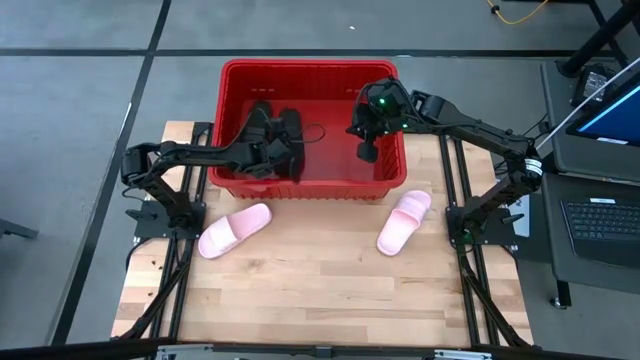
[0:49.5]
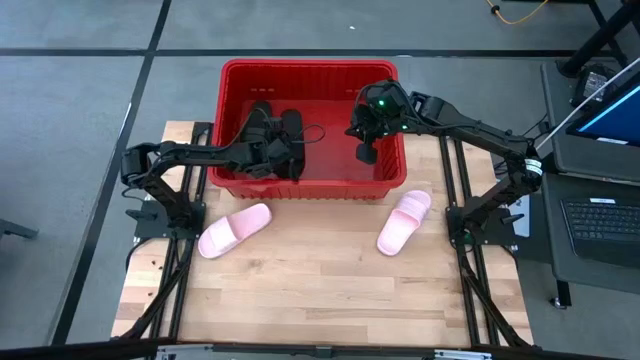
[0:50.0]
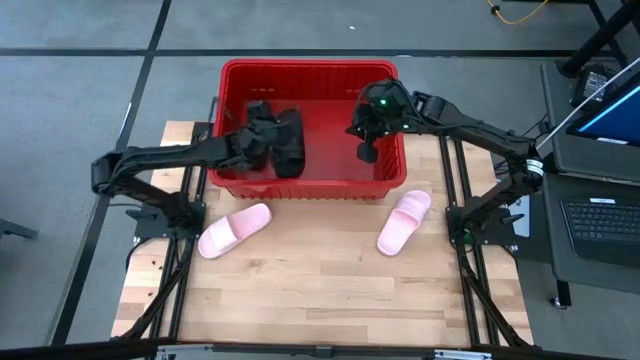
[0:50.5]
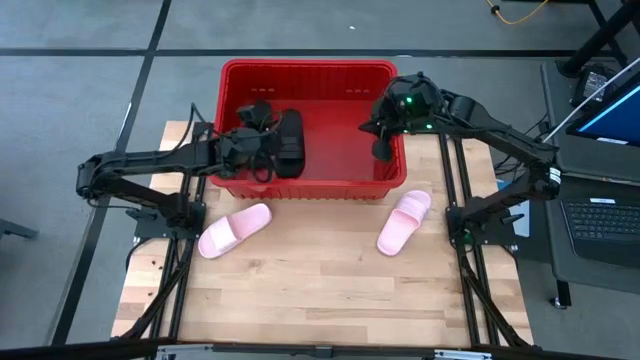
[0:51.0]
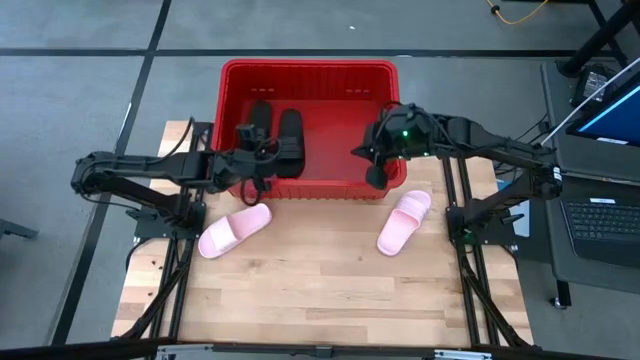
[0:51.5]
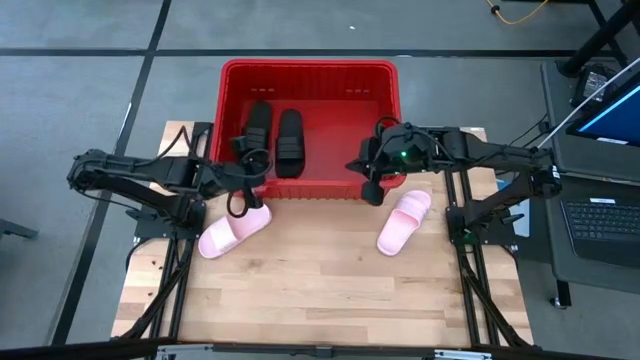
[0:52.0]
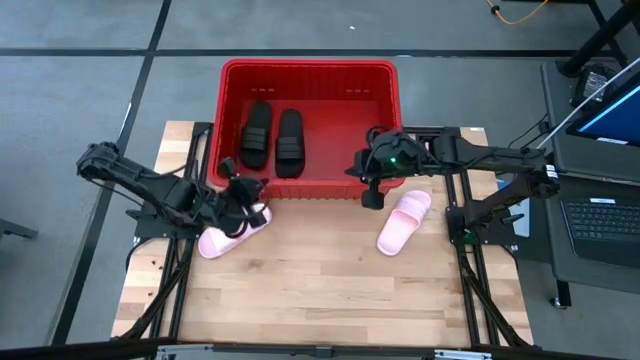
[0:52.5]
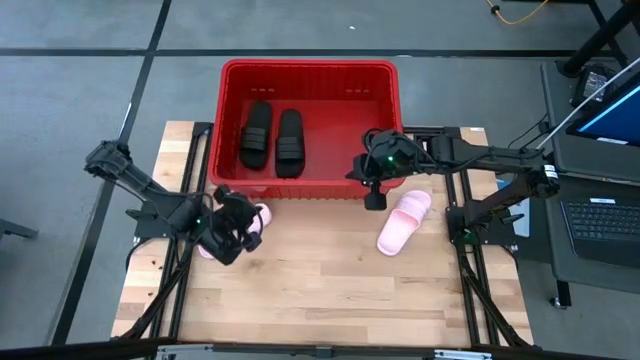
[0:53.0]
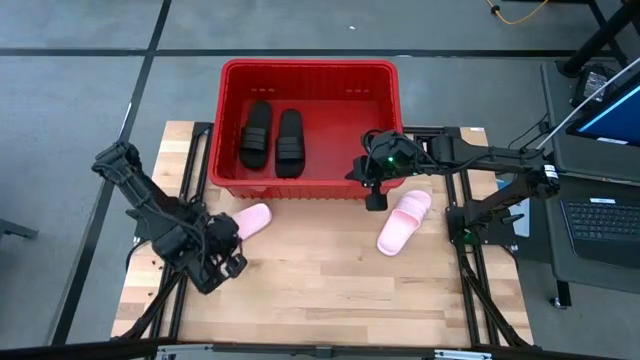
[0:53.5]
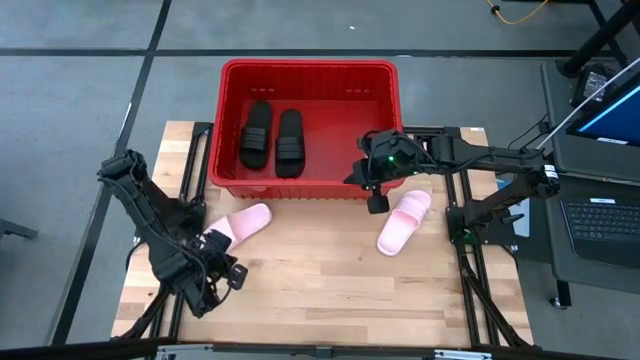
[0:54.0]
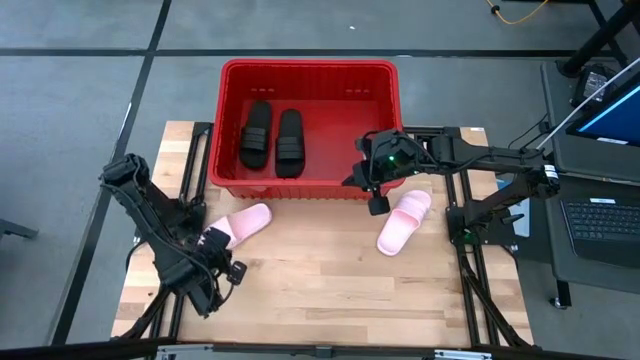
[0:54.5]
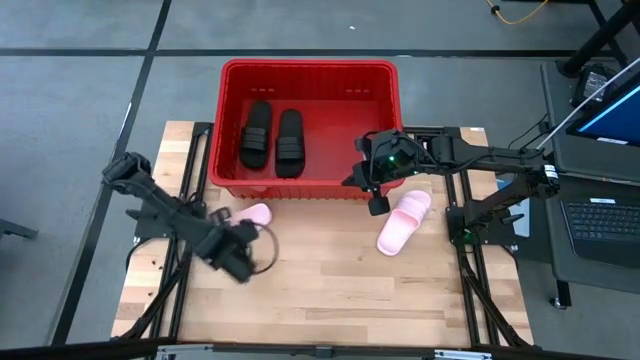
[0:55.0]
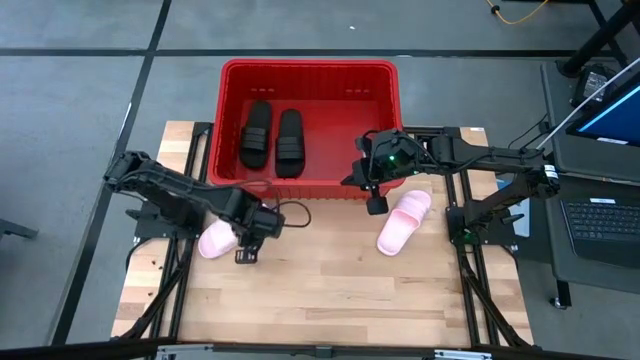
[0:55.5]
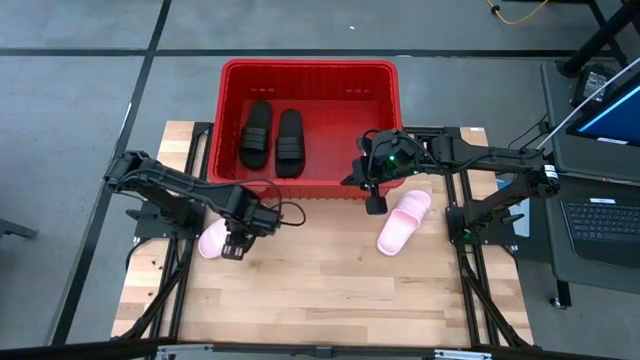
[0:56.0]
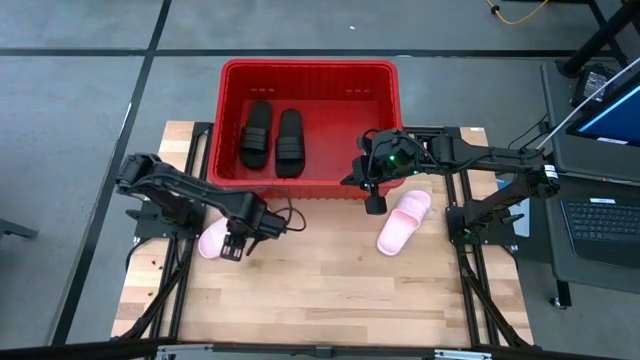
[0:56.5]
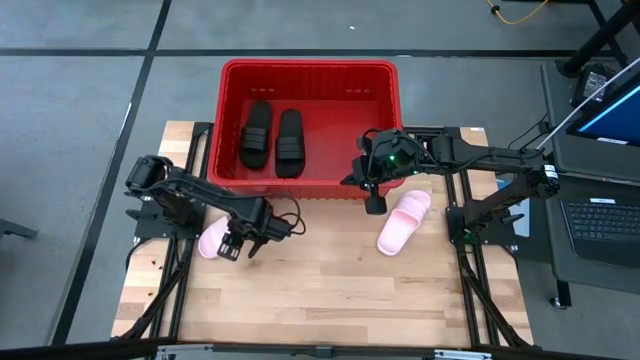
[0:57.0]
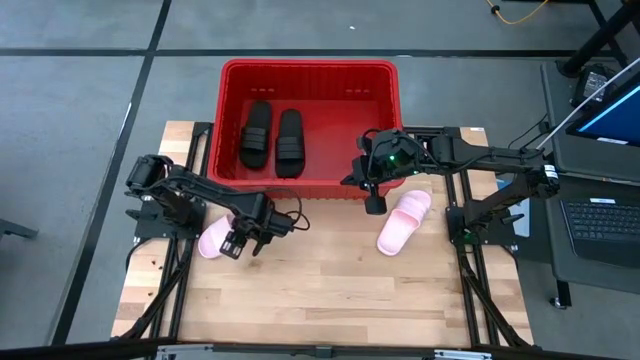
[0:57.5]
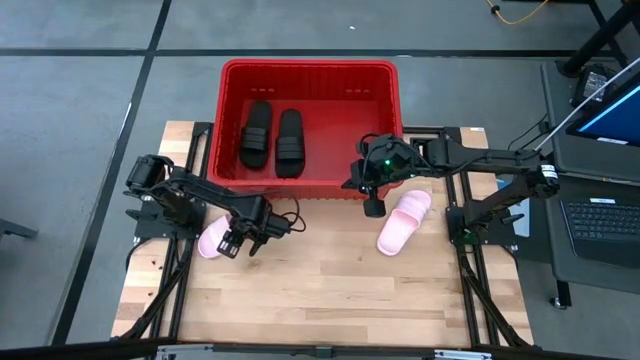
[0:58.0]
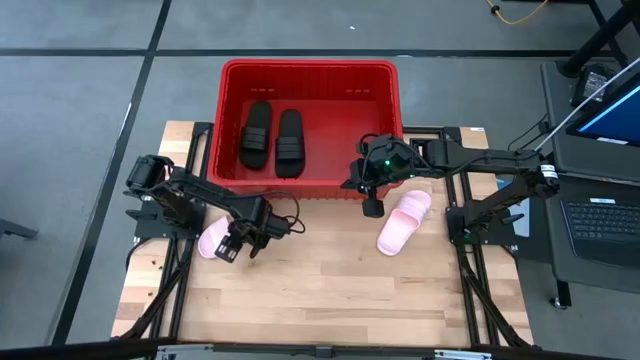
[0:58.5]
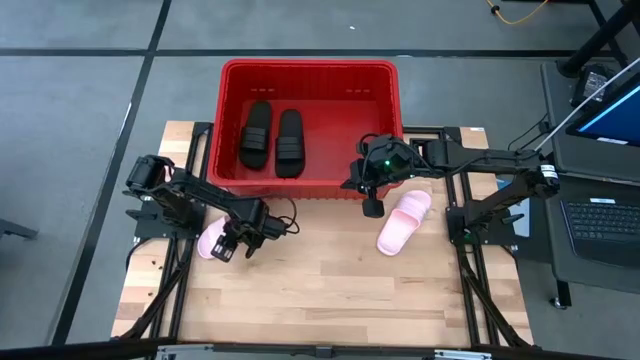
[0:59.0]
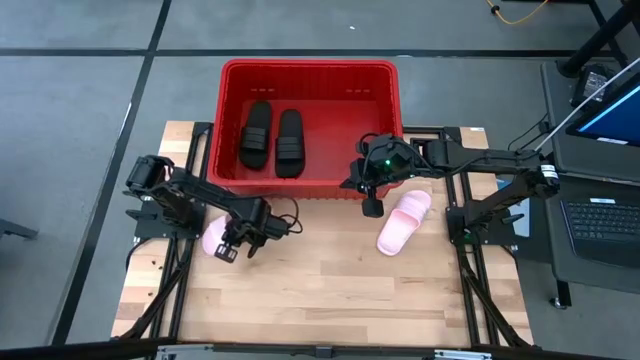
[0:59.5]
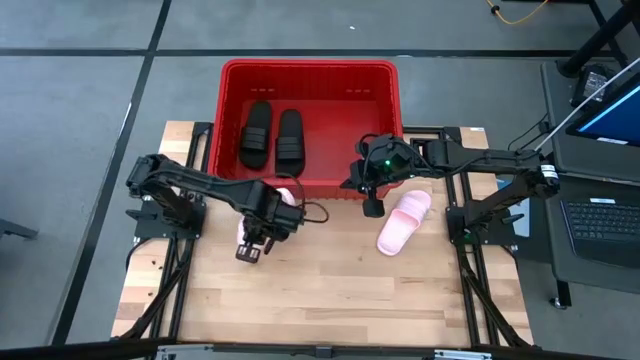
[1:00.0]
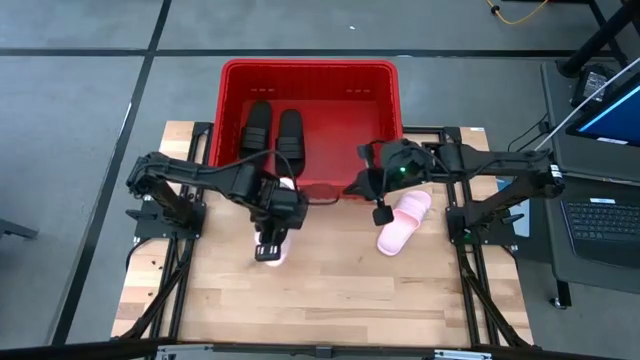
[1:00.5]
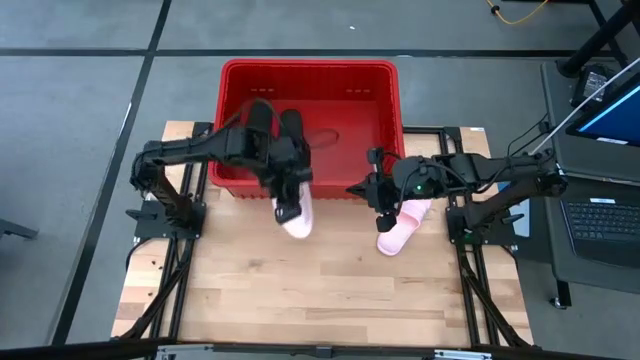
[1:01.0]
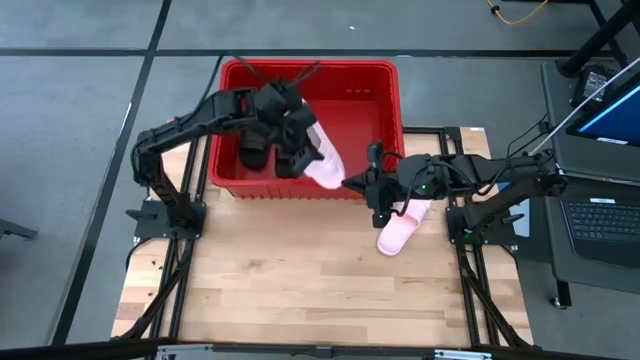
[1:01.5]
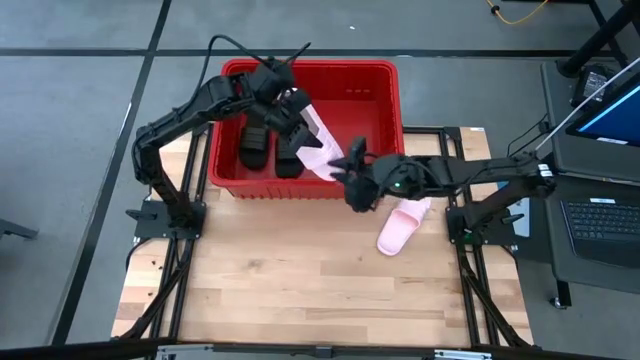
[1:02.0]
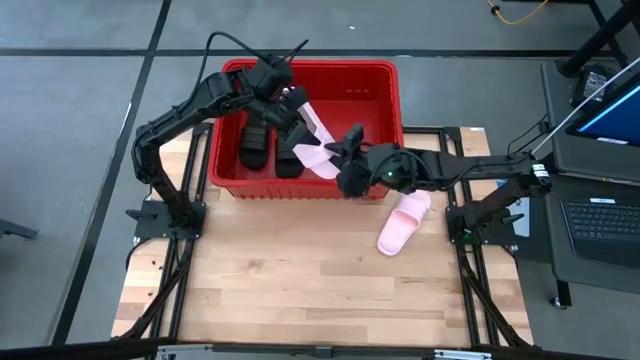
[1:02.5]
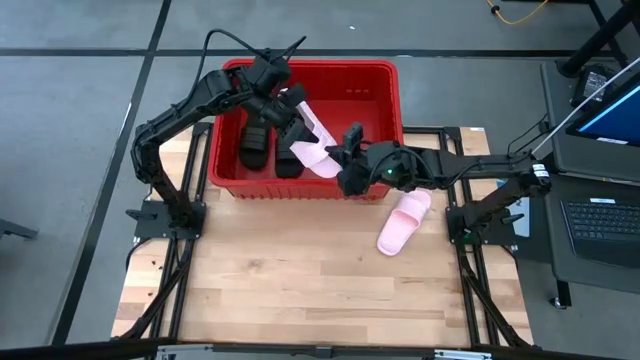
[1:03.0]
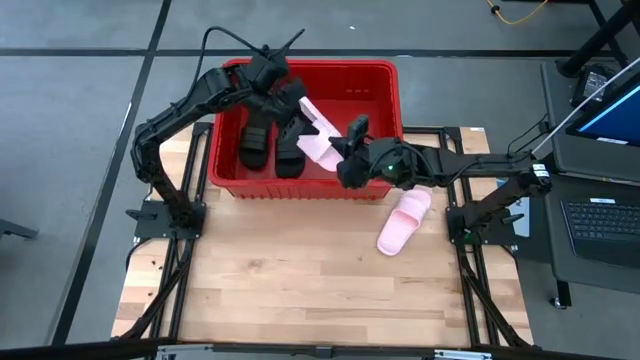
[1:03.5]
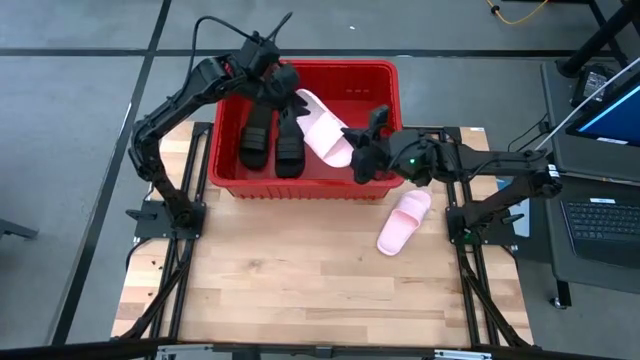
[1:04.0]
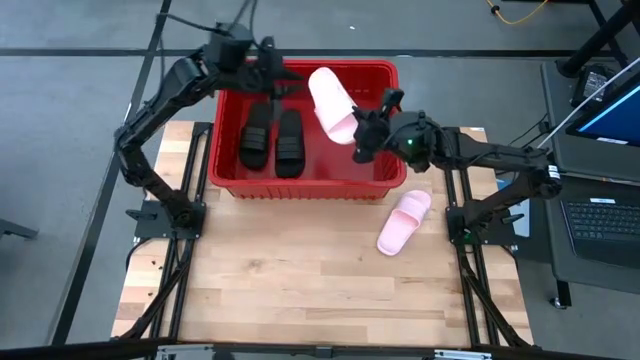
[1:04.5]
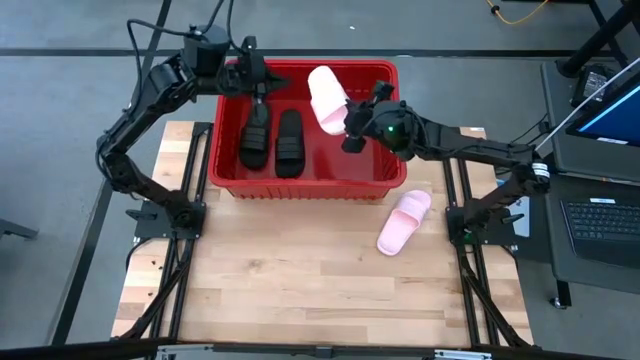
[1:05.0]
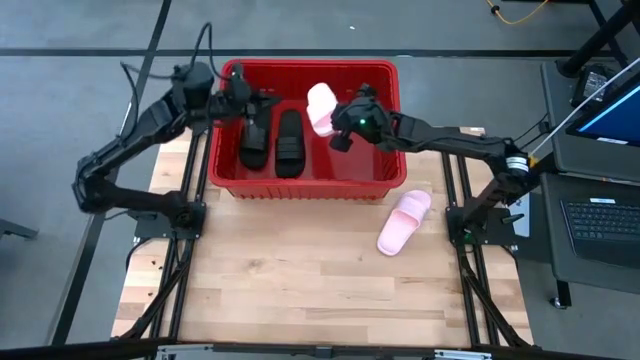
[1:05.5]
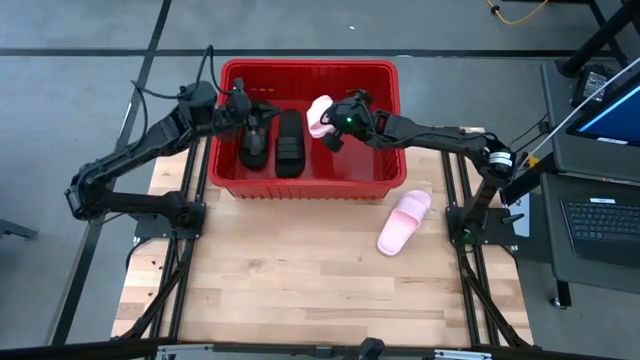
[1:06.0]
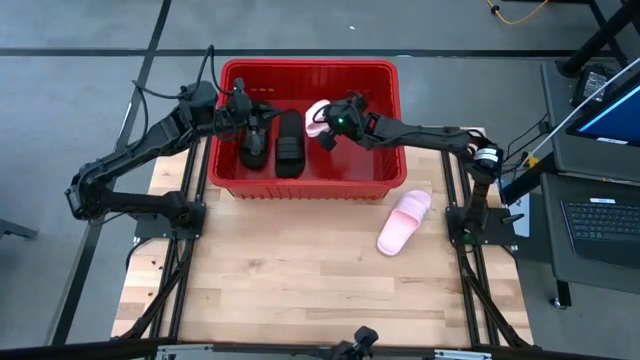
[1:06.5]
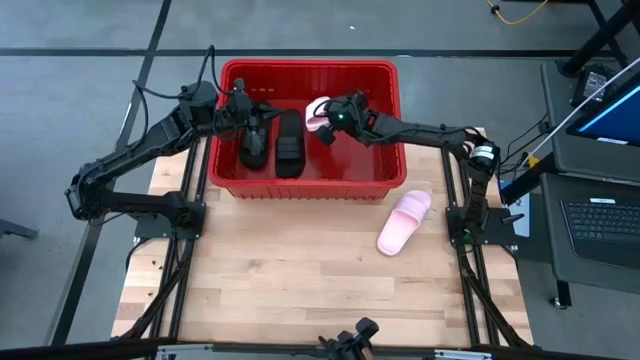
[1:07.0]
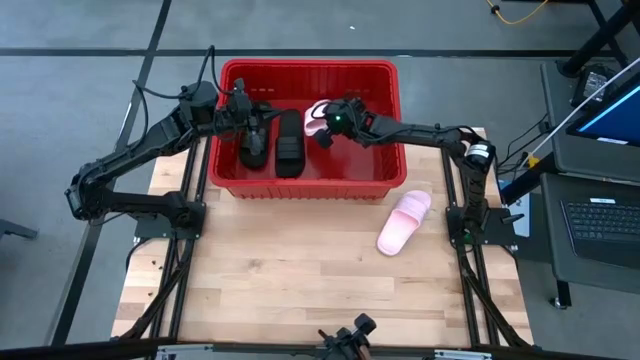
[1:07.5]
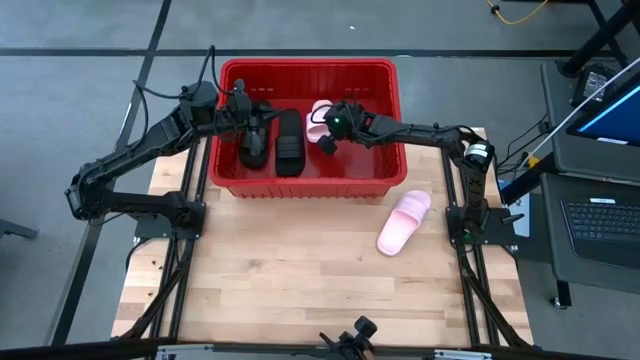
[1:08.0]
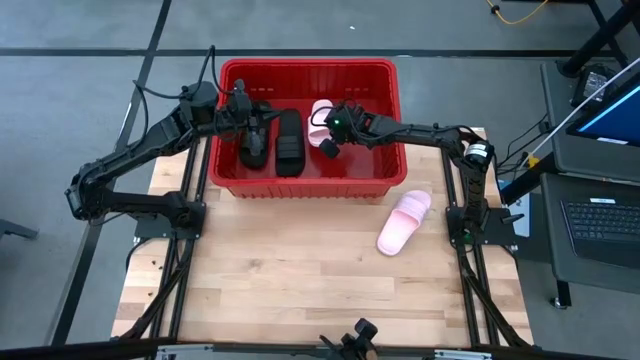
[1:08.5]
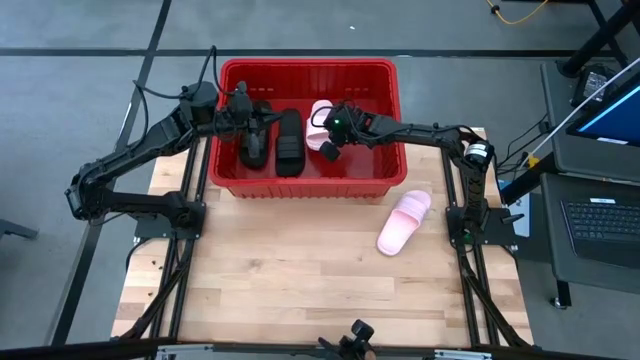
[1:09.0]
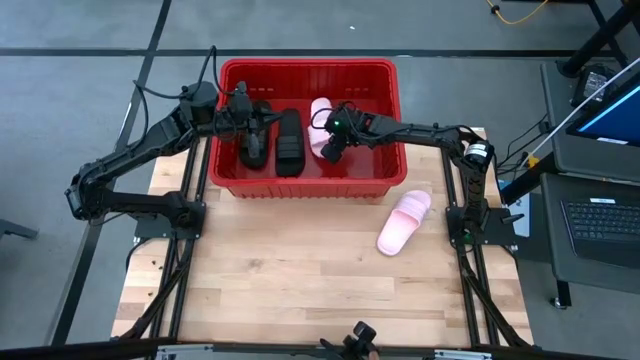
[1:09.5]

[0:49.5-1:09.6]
Task: Pick and place slides into bin
Put the left pink slide into the red bin
